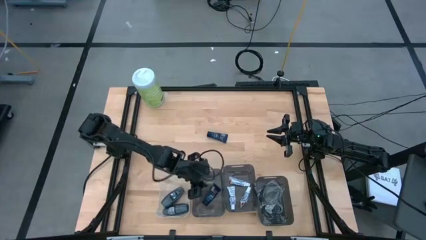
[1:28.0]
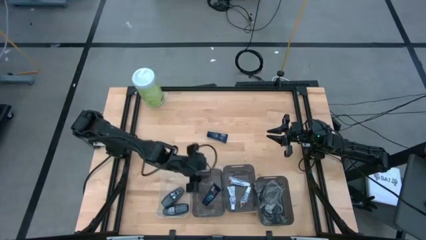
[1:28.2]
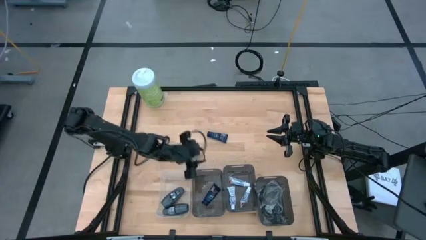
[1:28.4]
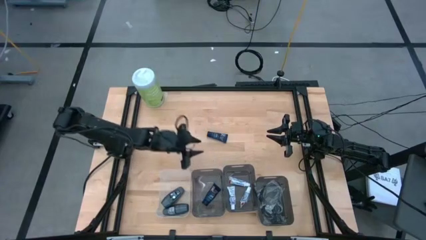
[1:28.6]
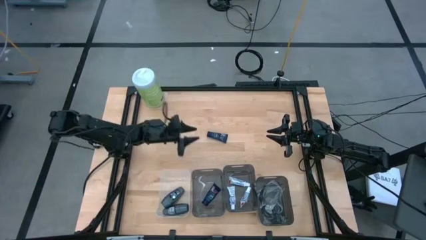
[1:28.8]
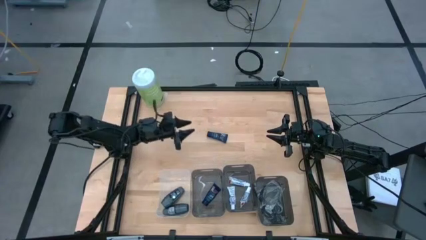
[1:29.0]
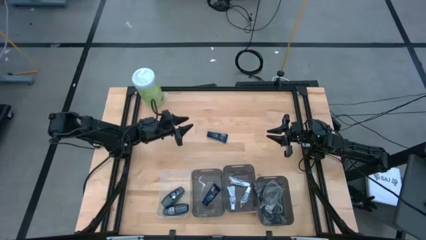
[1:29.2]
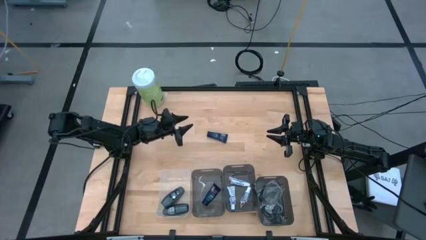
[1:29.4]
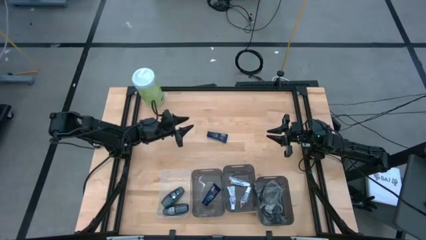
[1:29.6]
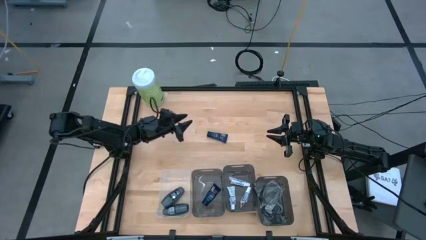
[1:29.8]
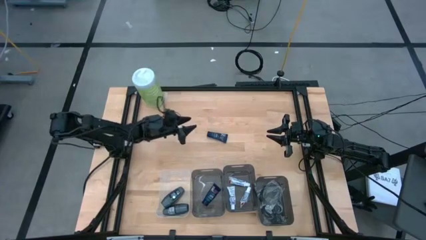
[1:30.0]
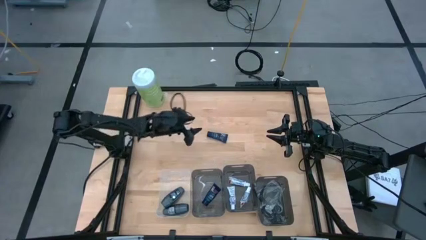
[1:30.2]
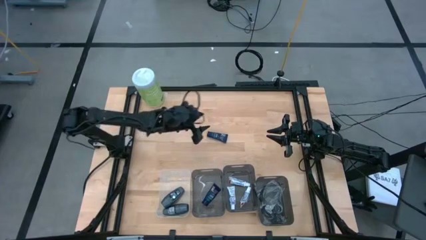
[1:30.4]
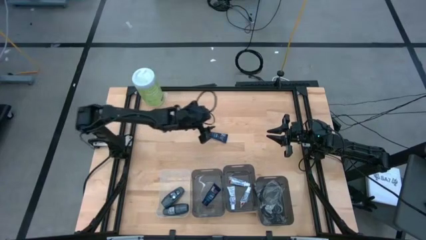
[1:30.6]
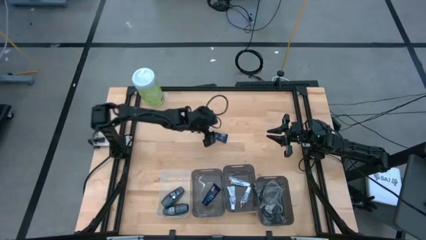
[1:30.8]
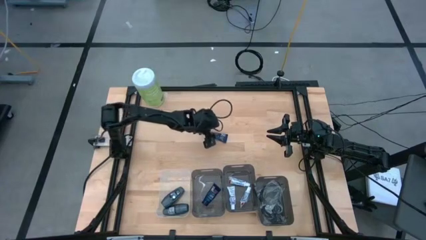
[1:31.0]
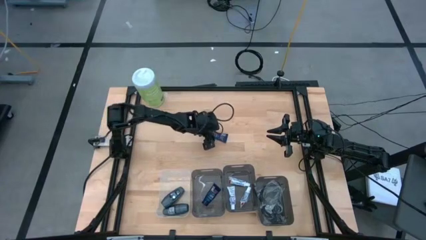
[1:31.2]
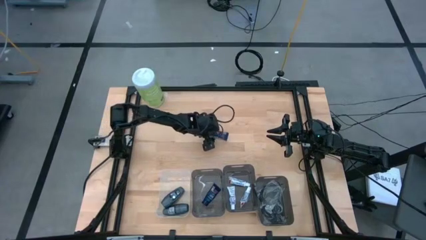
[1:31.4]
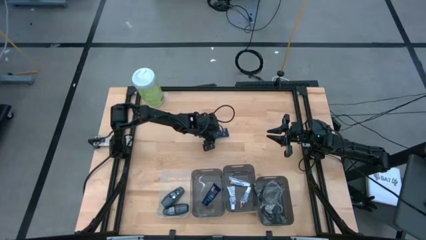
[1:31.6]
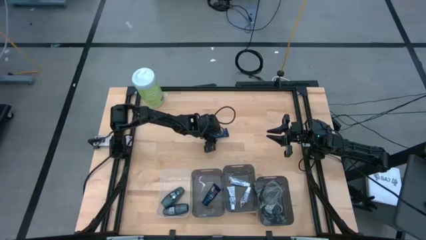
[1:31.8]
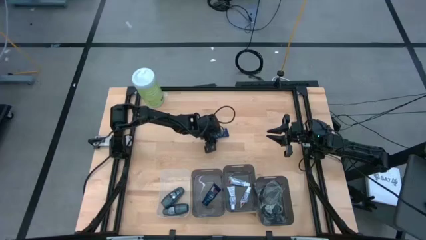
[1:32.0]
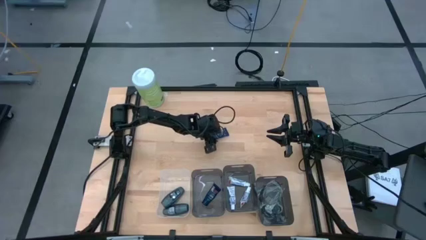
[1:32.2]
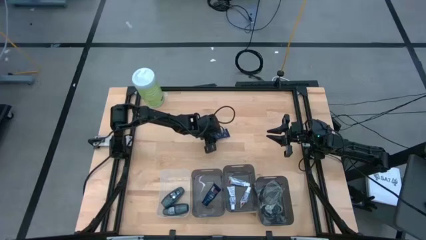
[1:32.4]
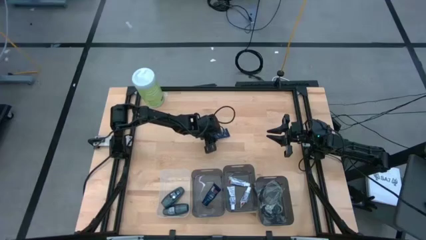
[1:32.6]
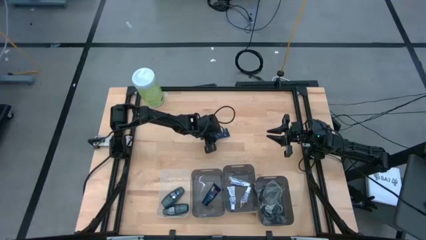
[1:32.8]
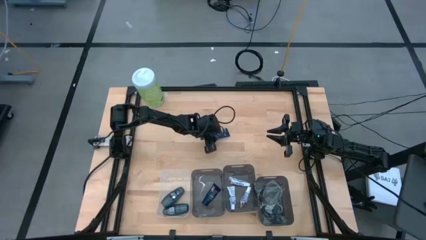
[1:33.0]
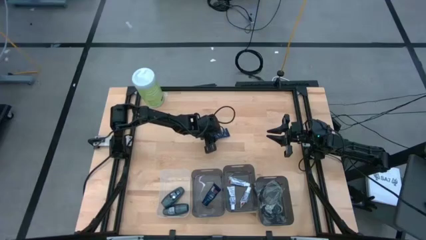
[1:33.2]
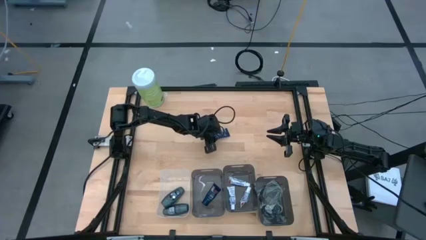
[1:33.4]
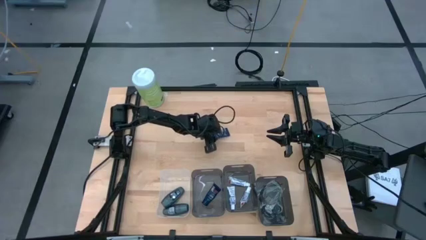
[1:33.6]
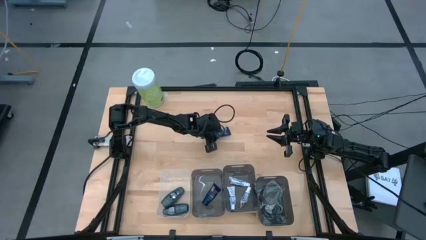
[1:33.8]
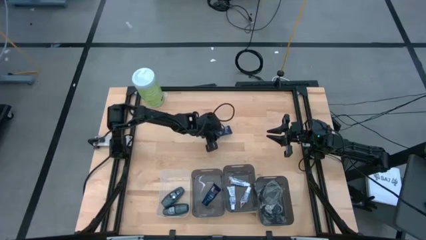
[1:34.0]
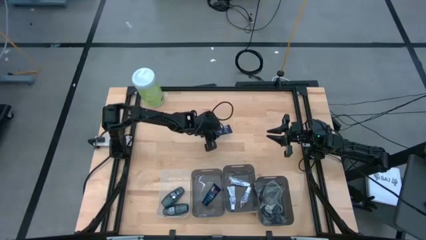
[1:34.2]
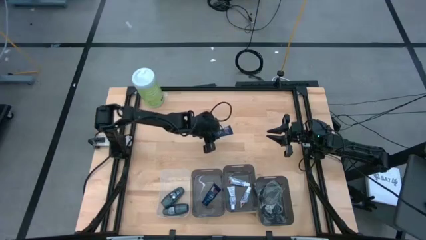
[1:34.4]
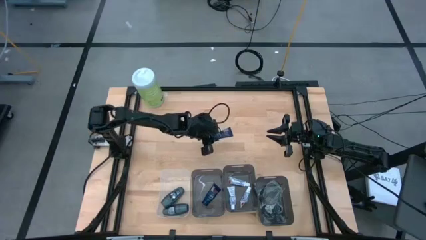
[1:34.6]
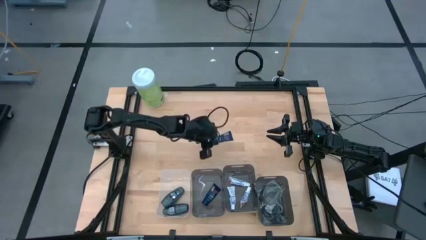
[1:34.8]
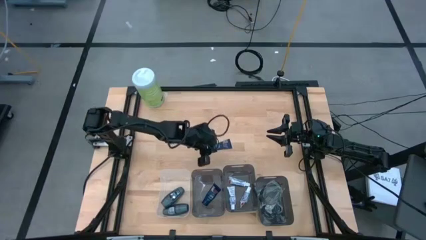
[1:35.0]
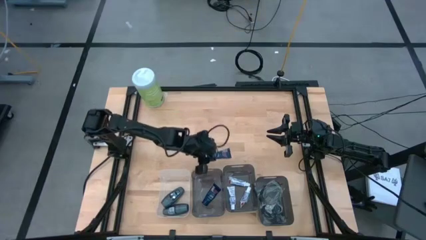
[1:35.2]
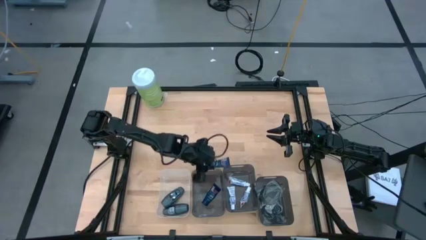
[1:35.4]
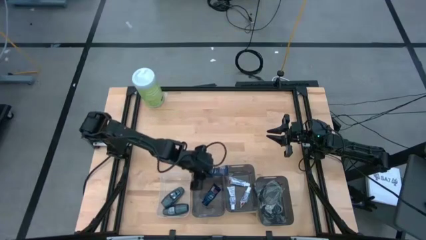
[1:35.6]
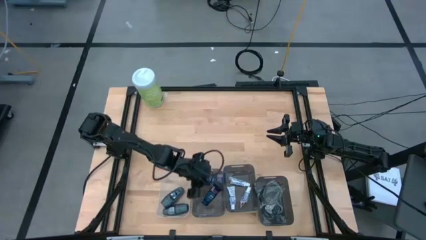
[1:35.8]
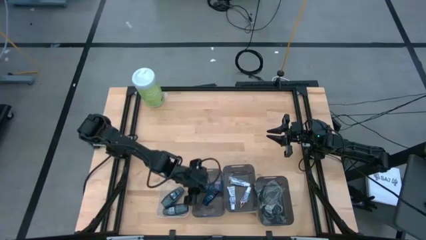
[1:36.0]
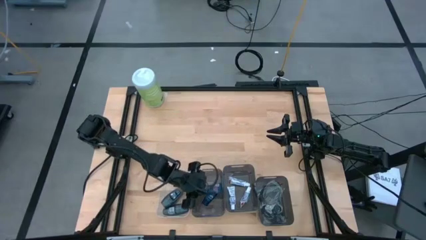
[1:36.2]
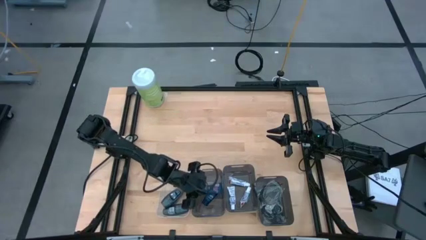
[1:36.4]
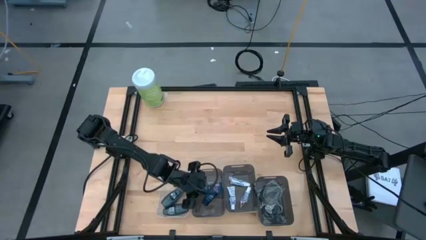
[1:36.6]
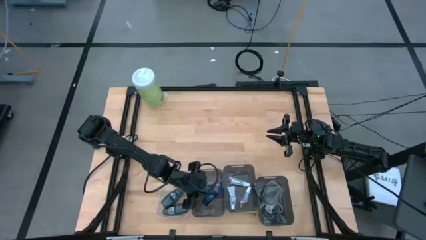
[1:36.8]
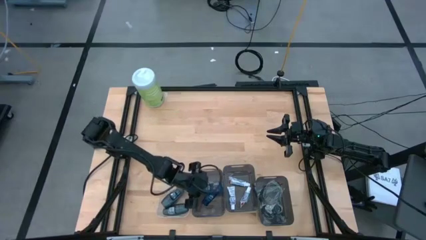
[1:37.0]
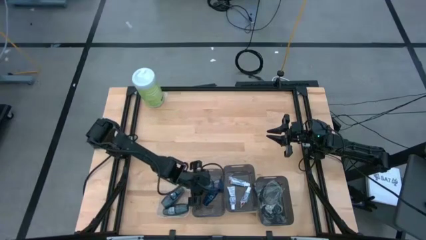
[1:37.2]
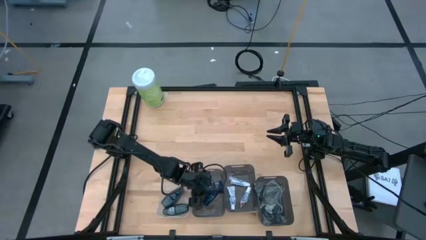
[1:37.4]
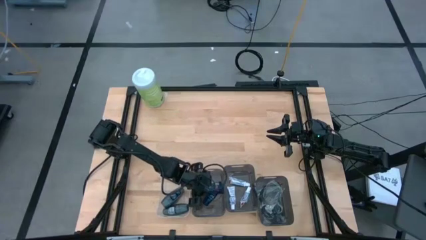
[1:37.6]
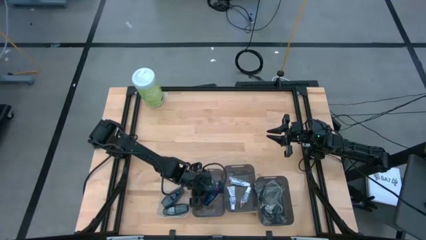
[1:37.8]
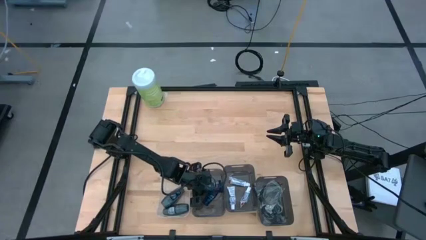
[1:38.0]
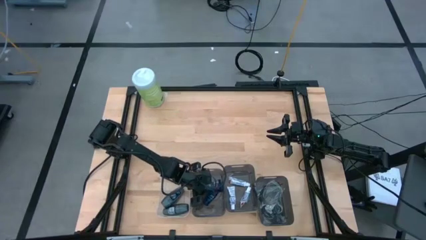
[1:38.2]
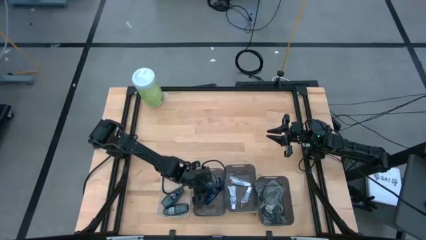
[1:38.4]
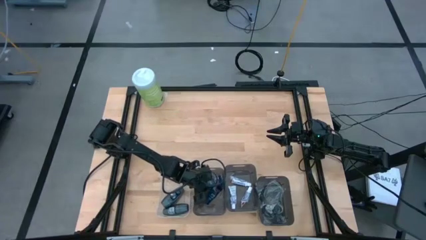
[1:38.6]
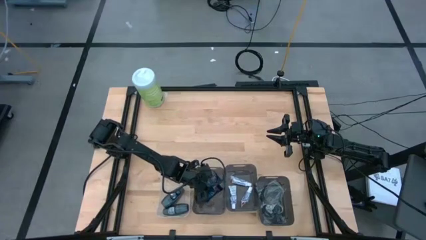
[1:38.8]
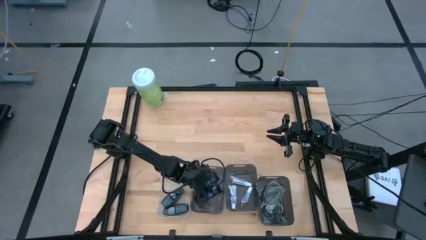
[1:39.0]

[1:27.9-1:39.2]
Task: Pick & Place Travel size toiletries
Put the blue shaving cream into the left black bin

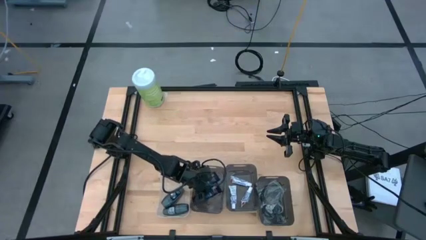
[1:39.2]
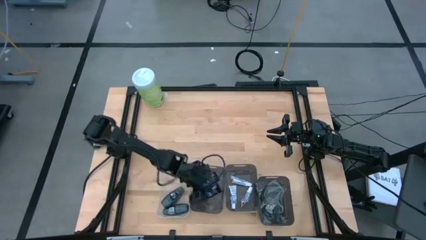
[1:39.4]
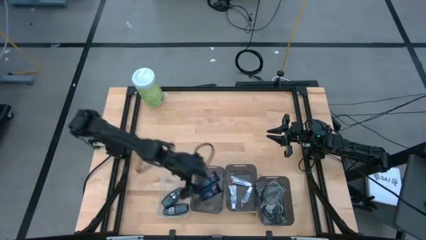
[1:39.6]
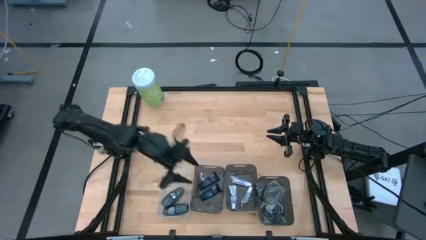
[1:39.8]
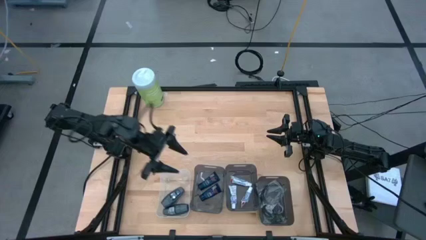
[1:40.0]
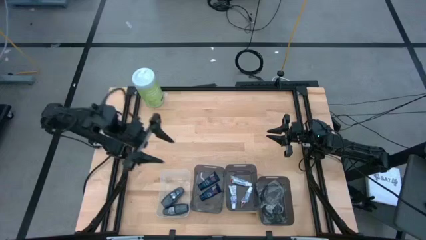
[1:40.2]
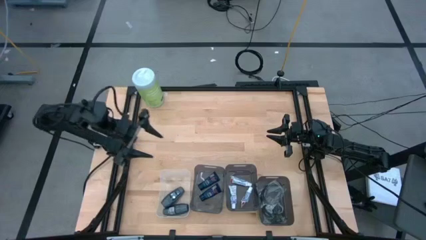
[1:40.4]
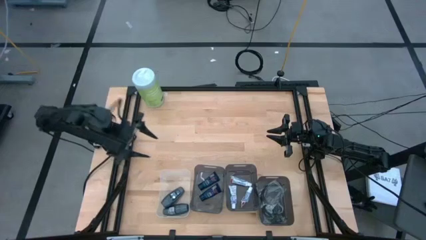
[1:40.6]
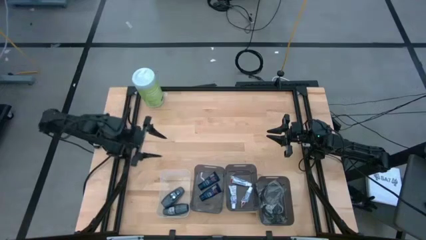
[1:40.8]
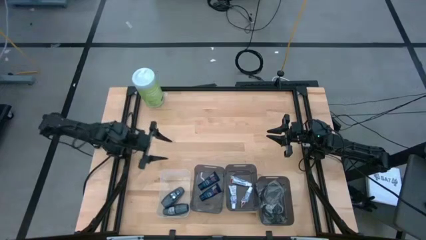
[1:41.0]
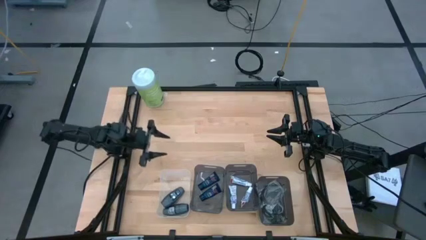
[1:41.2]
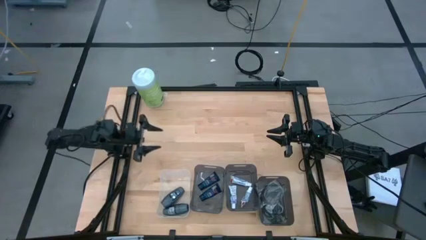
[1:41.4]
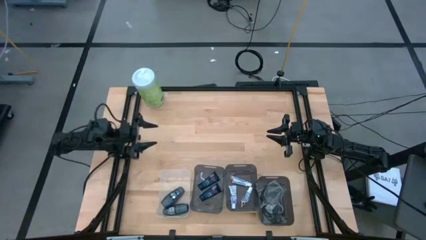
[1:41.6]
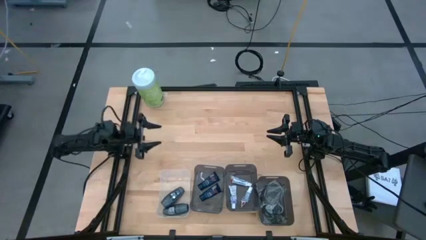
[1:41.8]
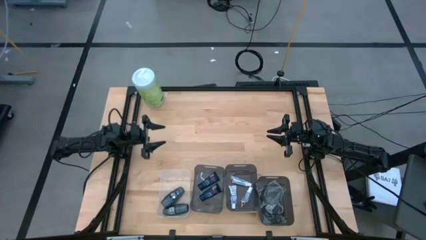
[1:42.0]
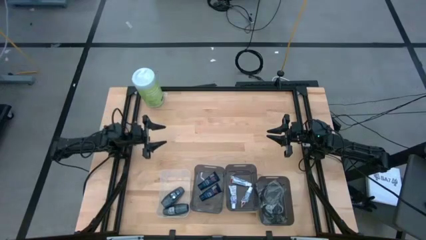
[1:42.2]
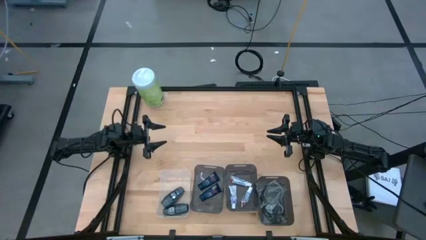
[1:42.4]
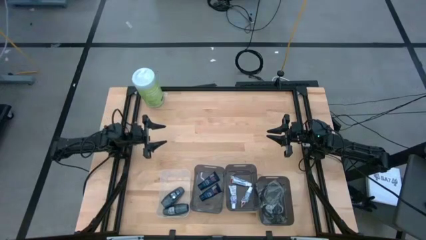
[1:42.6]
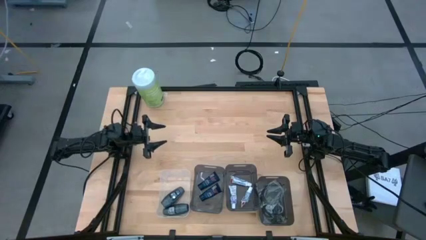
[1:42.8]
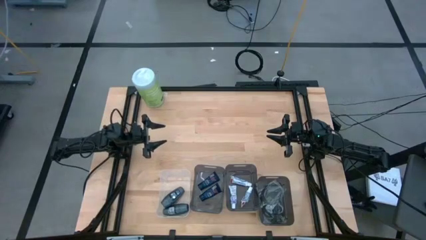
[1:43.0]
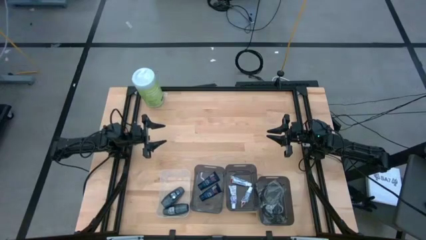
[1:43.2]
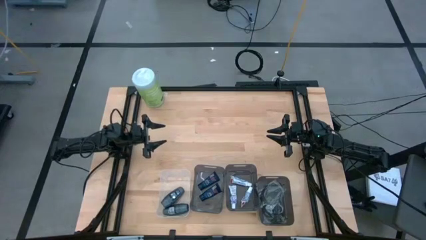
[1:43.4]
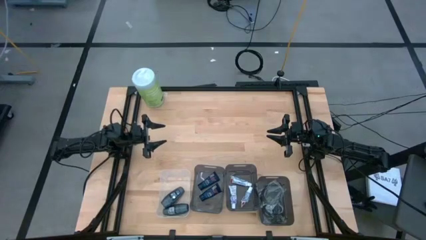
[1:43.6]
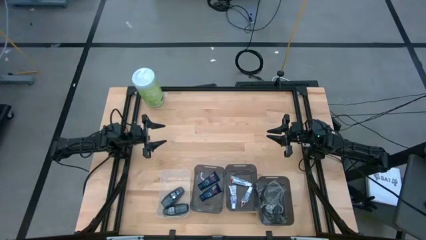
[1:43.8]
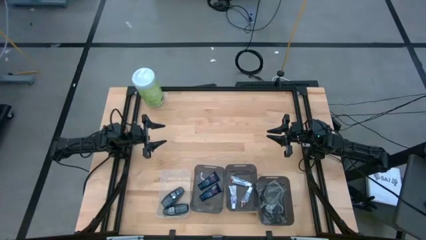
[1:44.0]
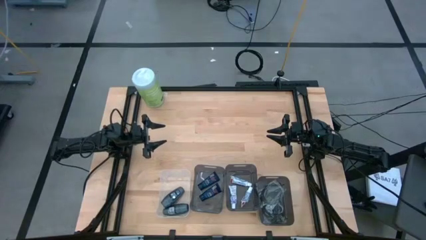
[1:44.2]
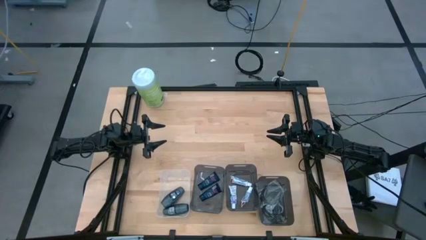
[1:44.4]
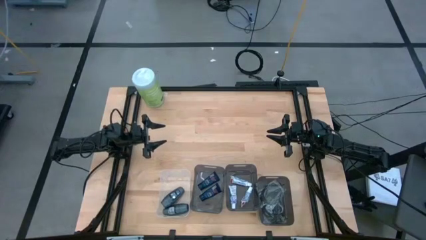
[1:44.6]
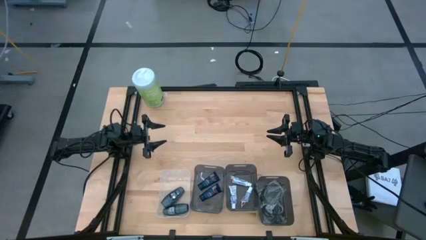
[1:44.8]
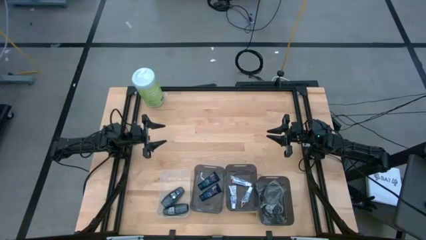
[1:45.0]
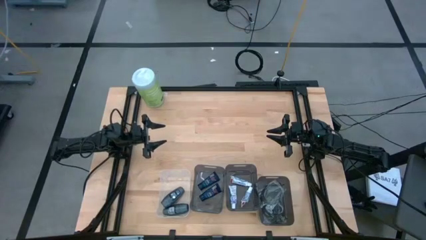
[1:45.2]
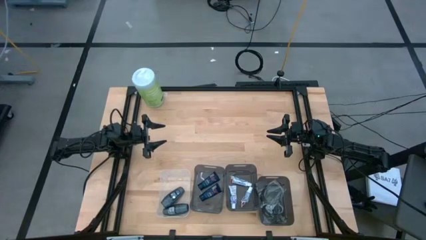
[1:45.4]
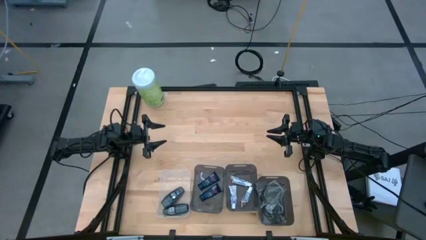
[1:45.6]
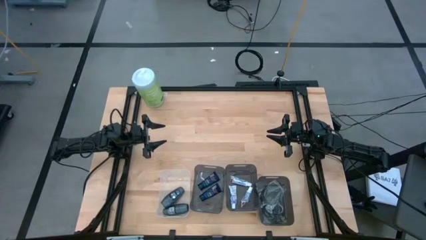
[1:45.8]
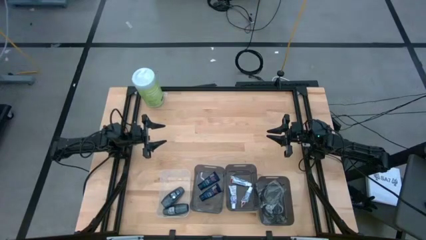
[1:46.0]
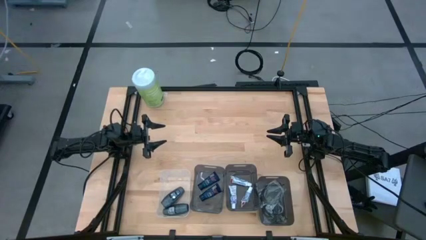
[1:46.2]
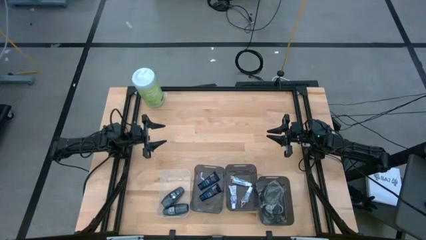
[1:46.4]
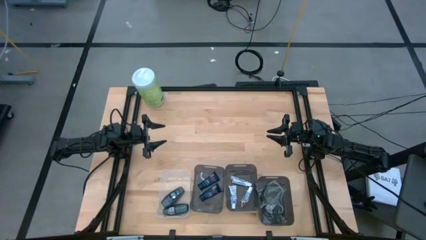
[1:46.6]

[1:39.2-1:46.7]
Return to Home Position
